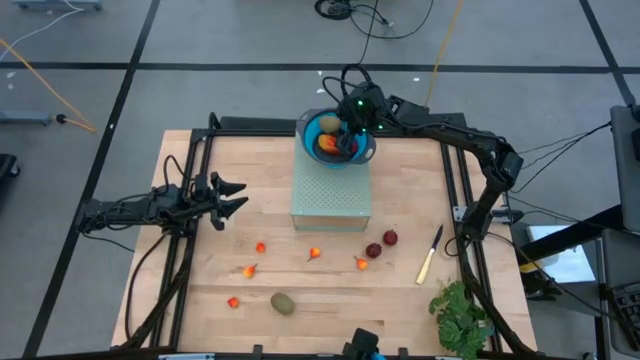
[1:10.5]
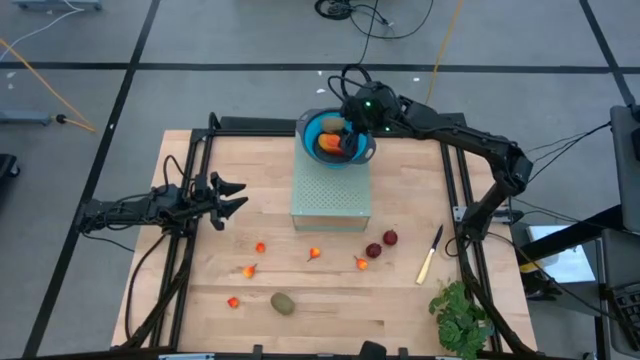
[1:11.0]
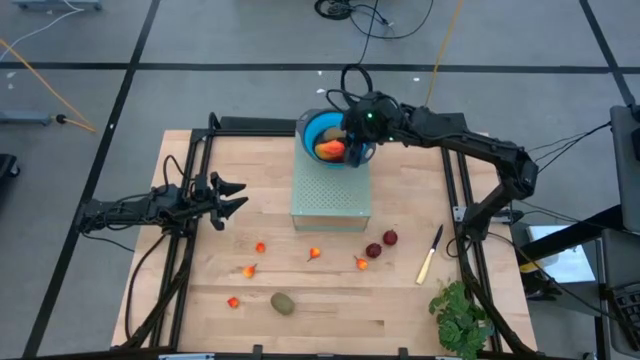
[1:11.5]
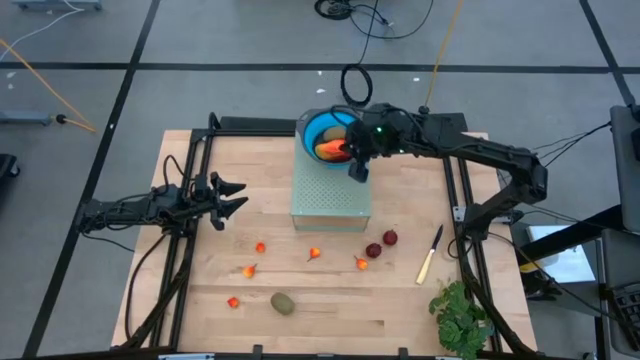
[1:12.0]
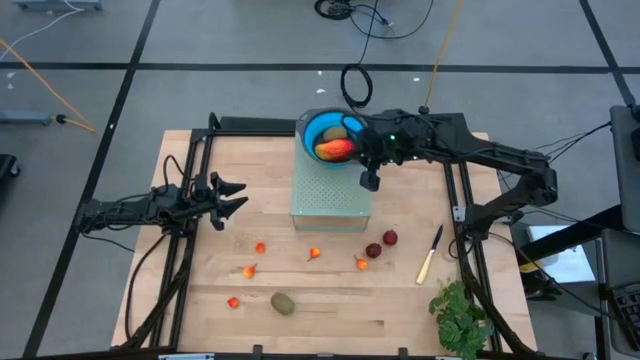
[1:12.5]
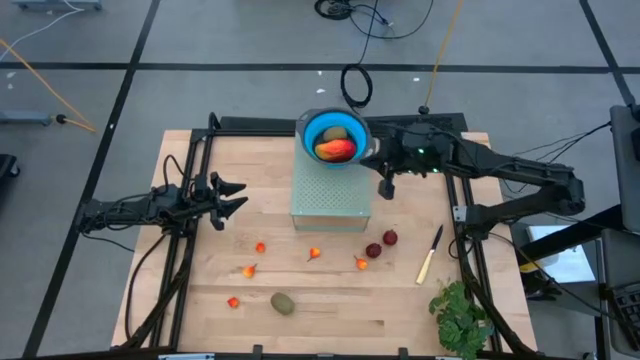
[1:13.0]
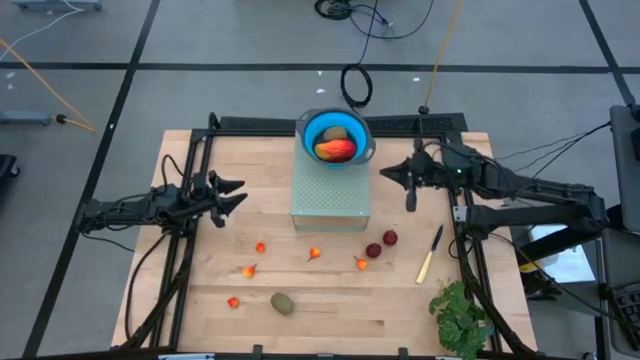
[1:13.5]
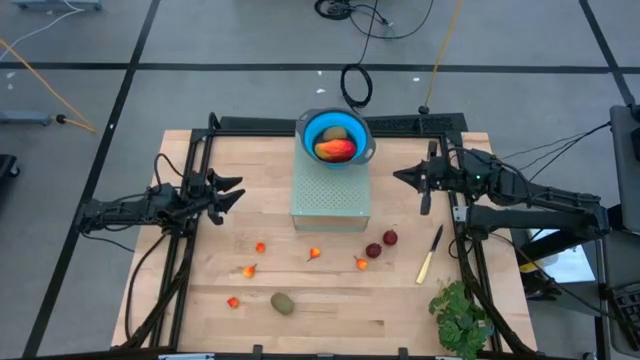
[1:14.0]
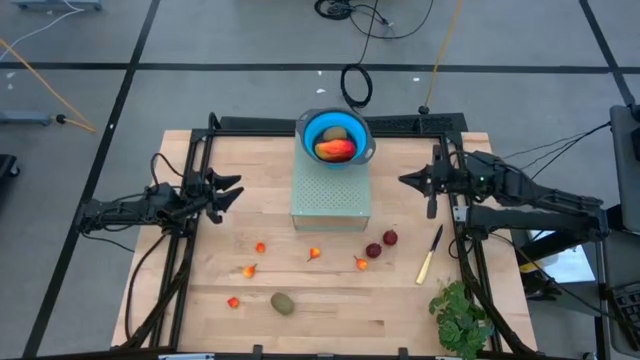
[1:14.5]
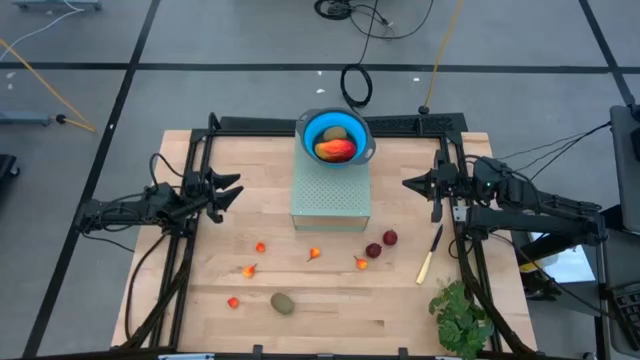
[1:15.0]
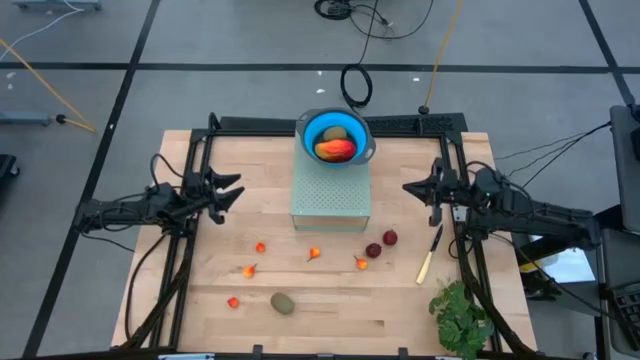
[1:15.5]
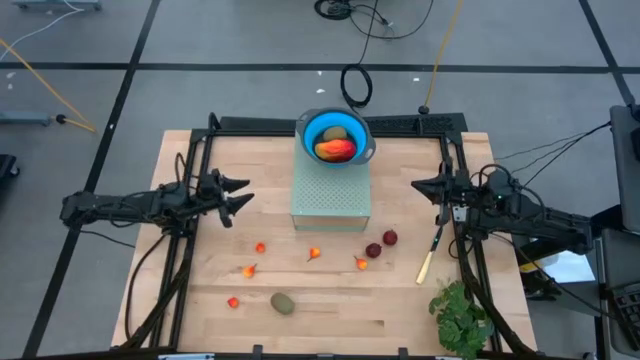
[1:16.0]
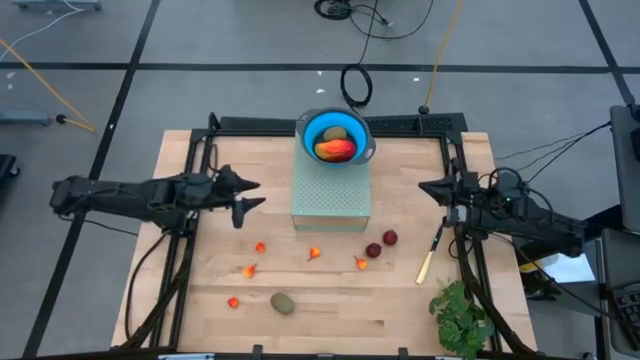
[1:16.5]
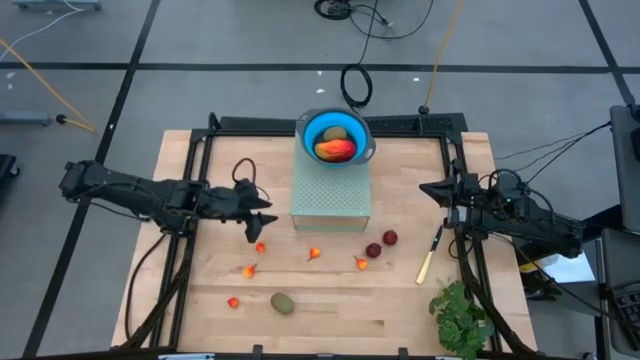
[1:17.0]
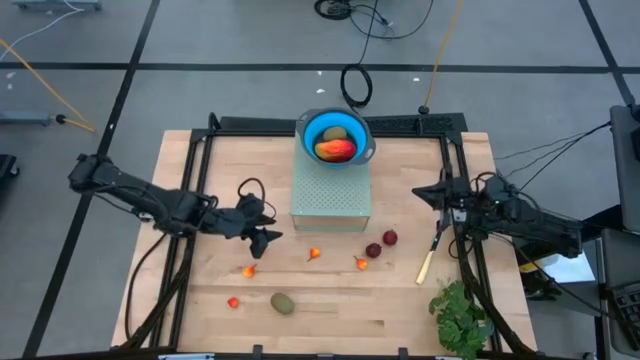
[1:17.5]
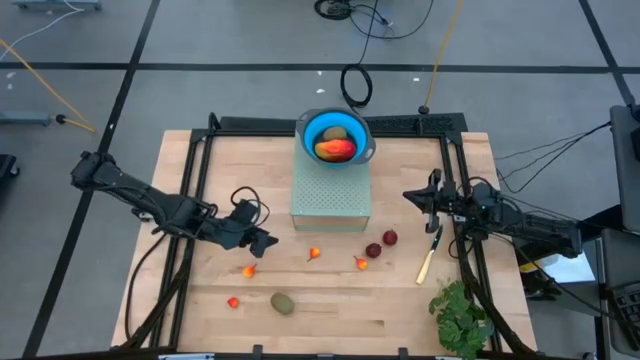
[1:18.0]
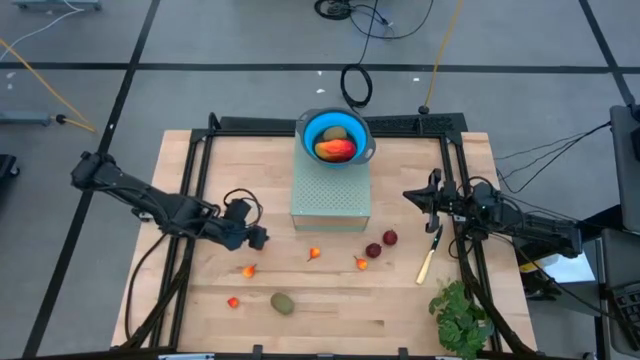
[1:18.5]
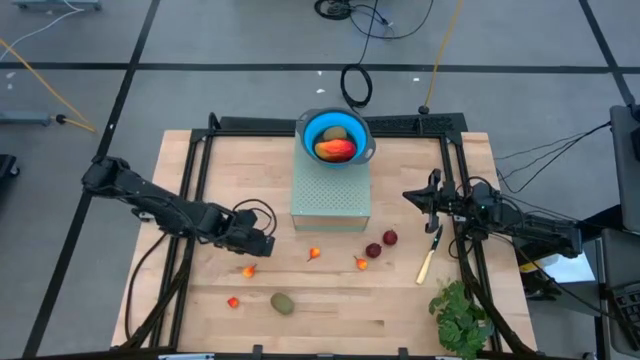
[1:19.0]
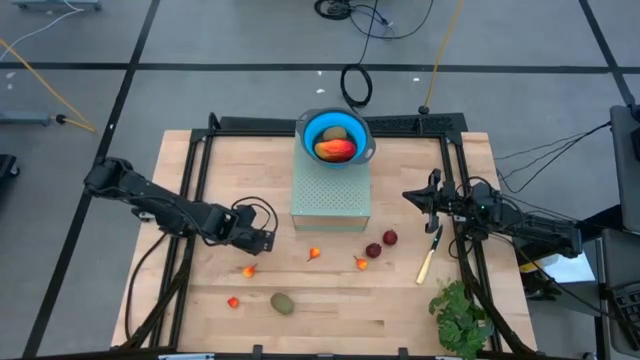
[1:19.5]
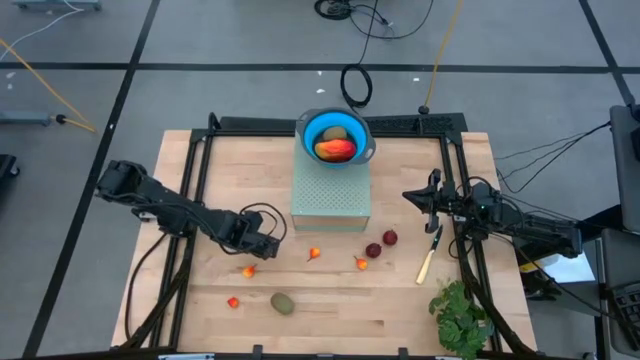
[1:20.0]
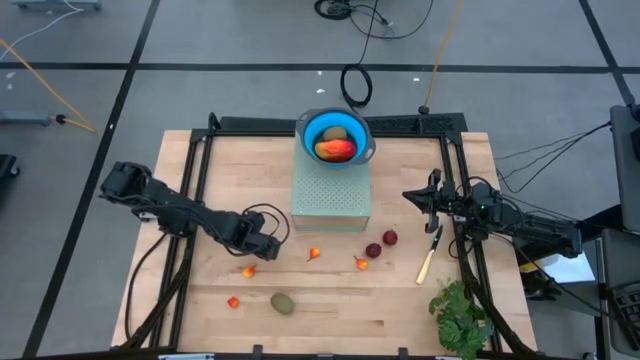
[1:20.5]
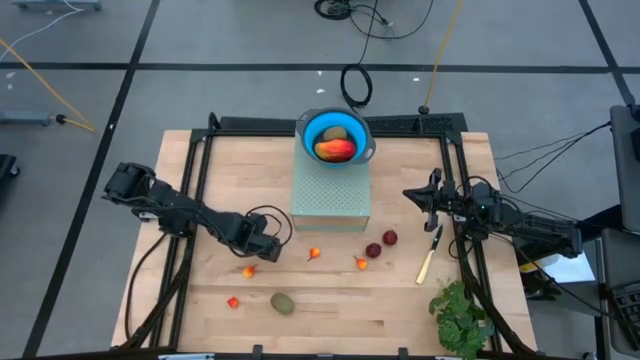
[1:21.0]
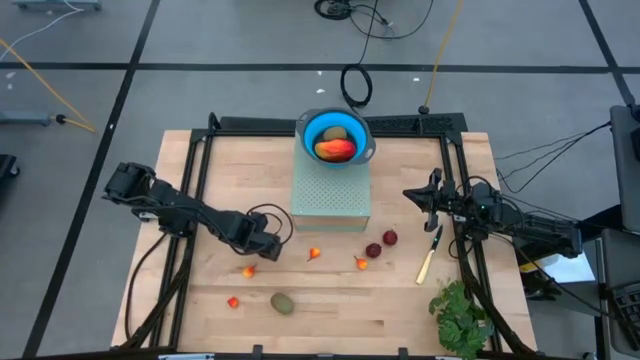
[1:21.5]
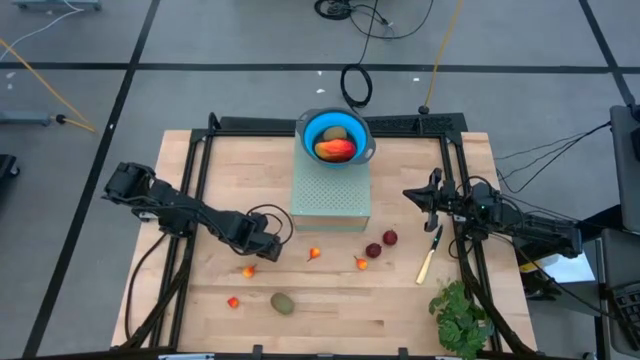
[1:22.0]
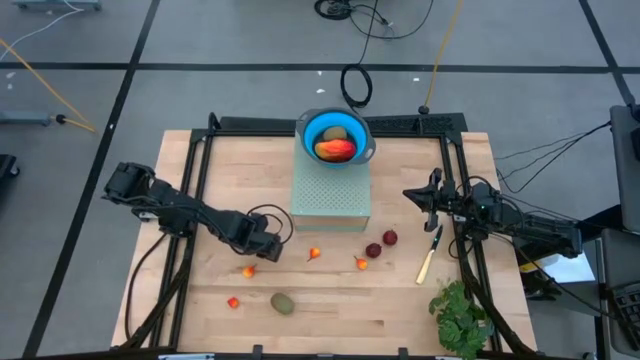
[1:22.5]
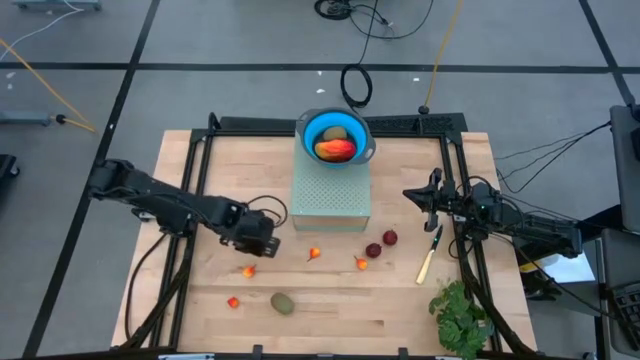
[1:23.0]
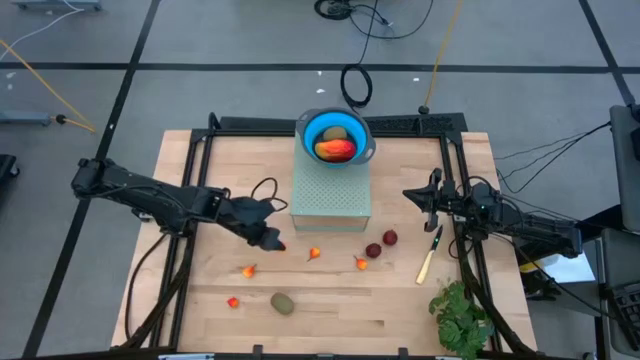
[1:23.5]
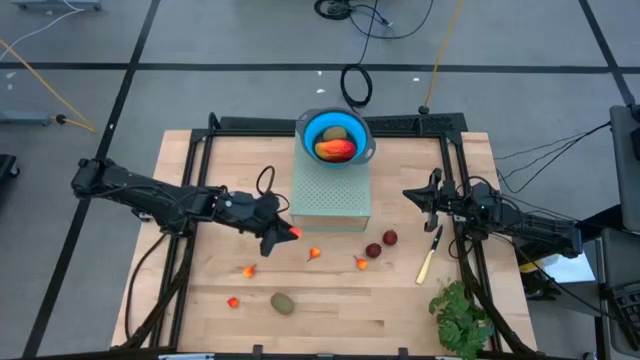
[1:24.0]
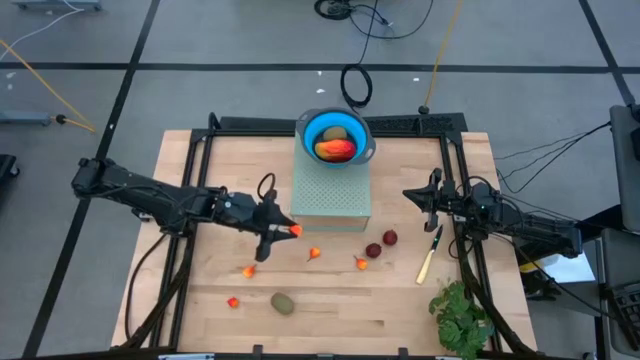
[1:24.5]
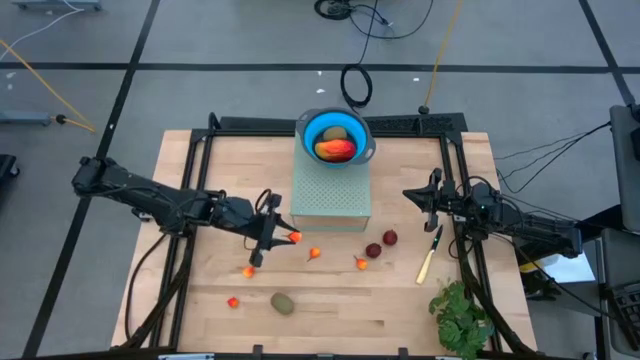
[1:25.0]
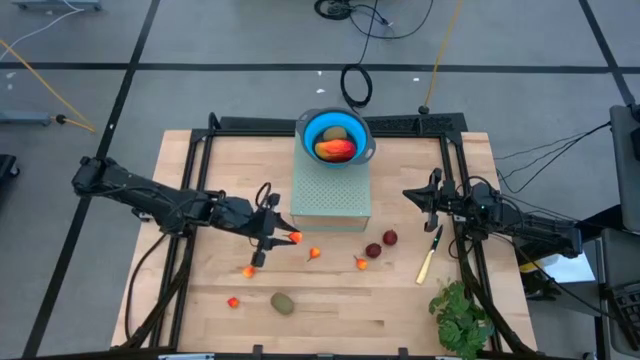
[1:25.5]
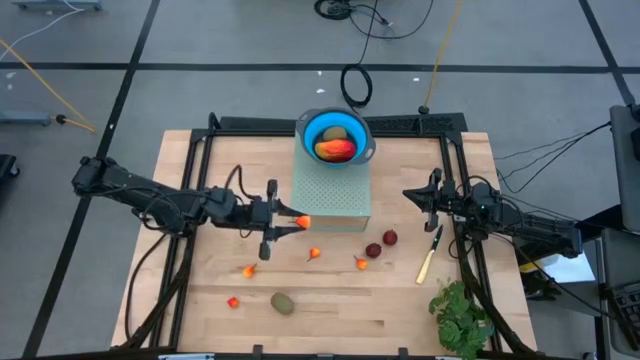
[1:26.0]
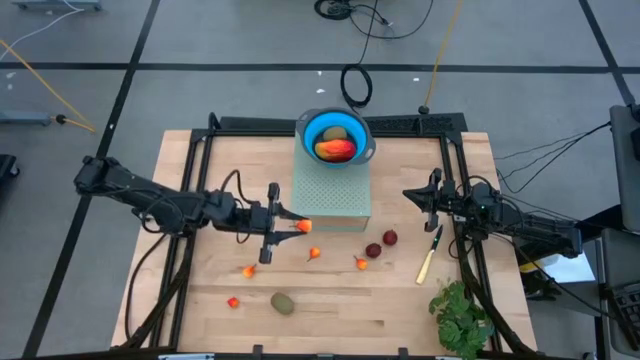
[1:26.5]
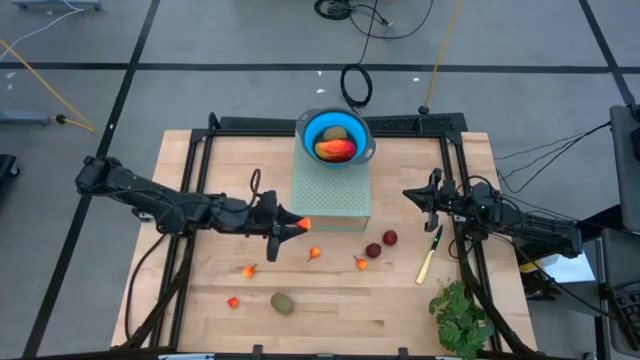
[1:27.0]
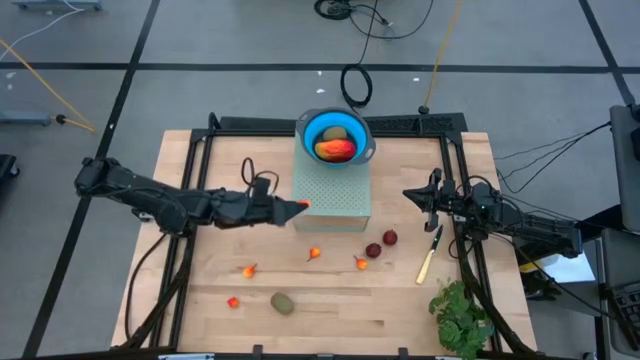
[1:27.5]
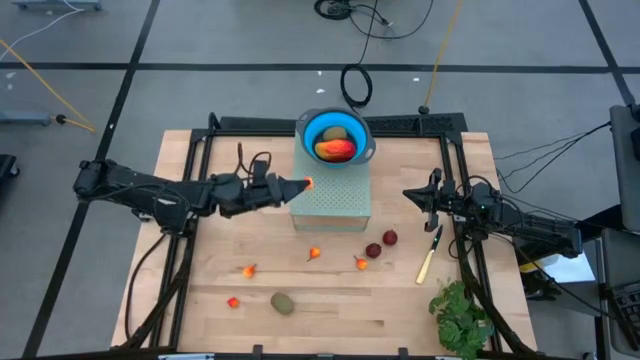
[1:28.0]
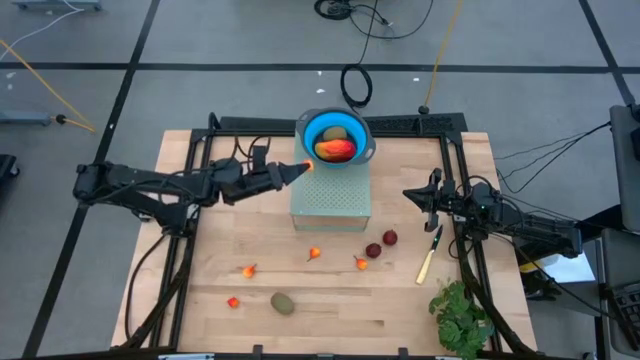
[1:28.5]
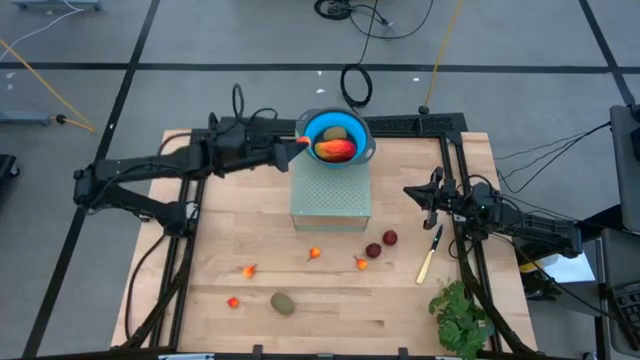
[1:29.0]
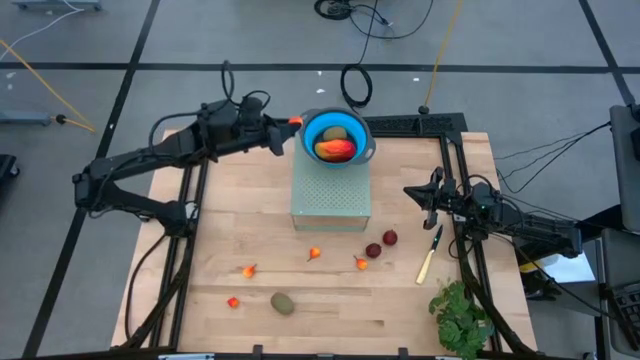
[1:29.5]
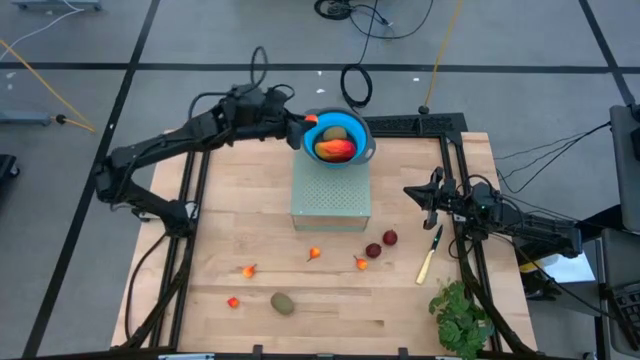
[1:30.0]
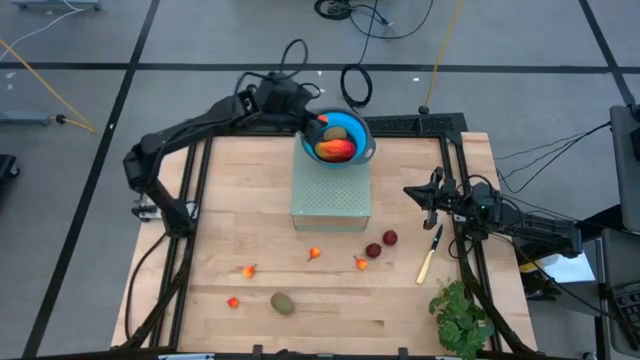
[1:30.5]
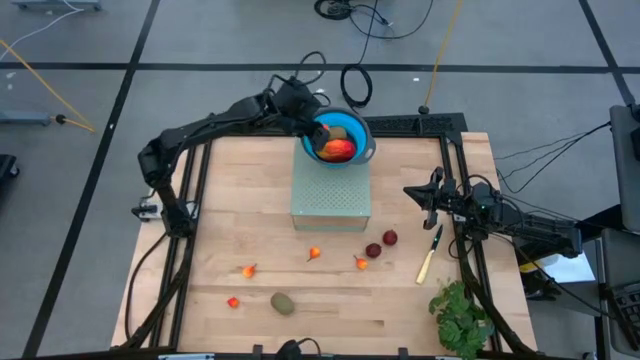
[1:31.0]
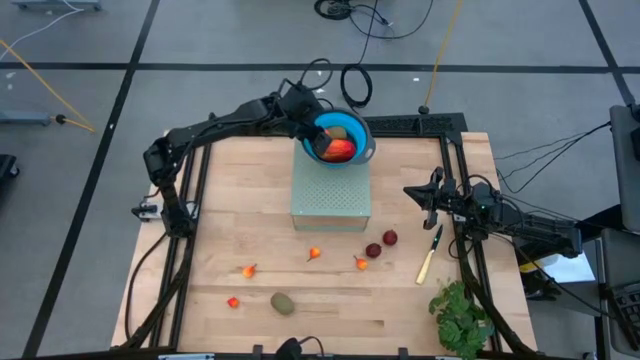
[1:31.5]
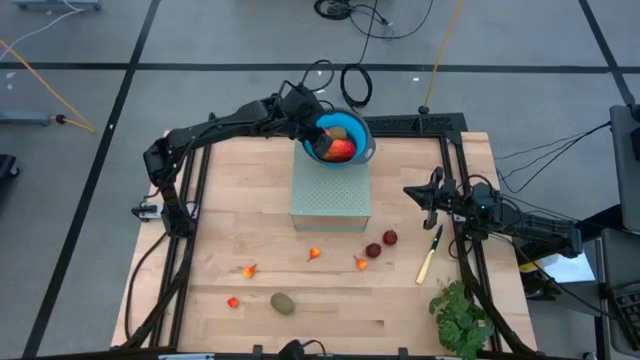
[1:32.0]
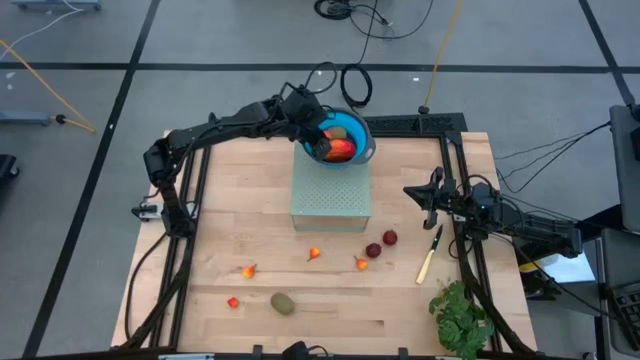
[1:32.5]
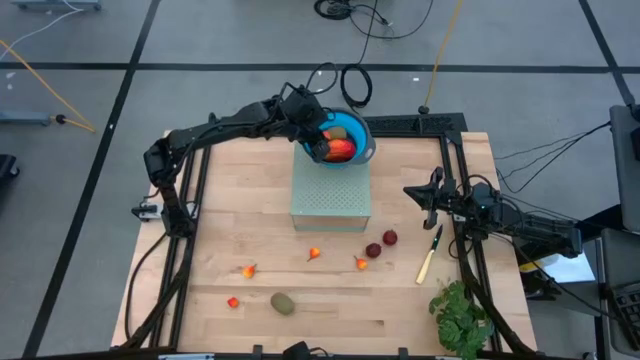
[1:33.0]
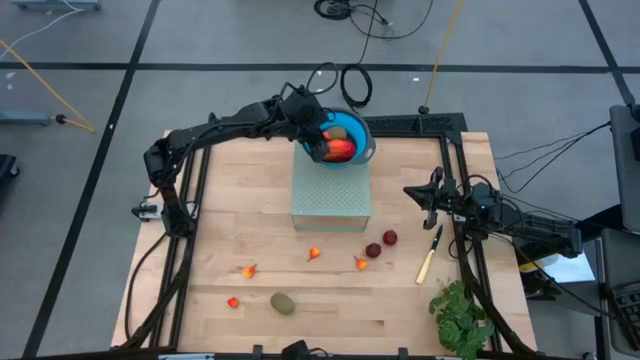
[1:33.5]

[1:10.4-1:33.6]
Task: Pick & Place Fruit
Put the pear into the blue strainer bowl on the shelf
